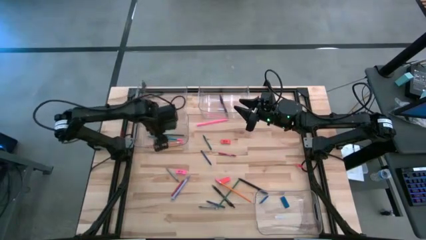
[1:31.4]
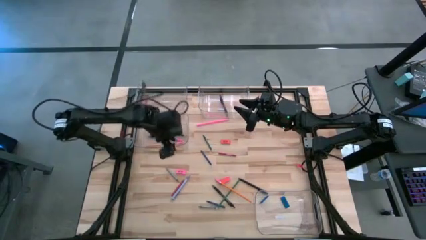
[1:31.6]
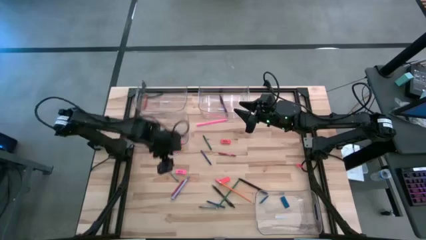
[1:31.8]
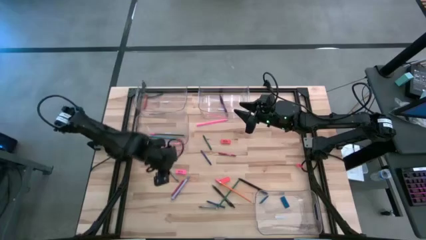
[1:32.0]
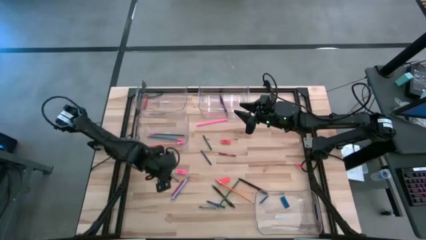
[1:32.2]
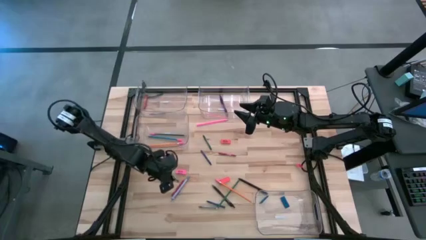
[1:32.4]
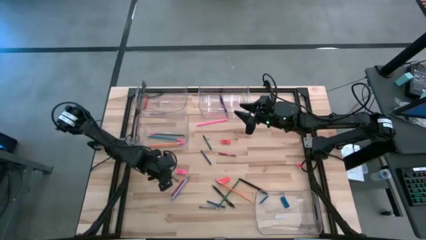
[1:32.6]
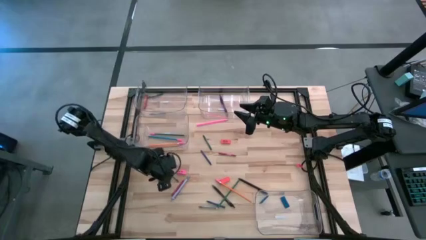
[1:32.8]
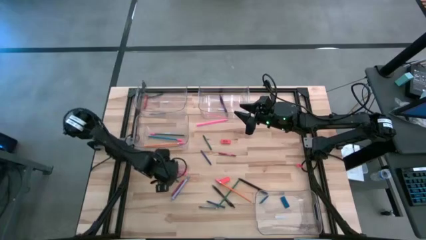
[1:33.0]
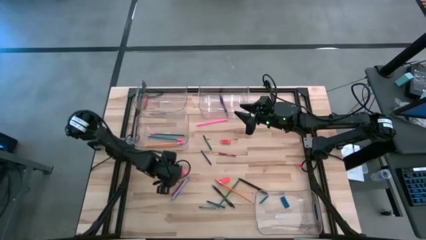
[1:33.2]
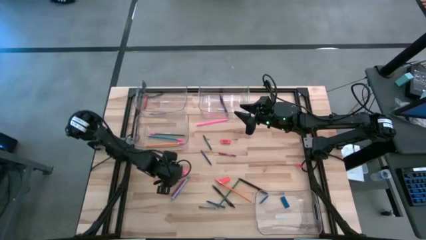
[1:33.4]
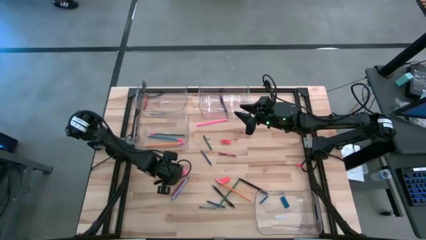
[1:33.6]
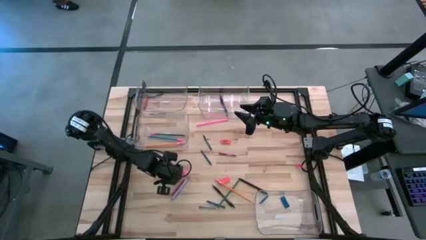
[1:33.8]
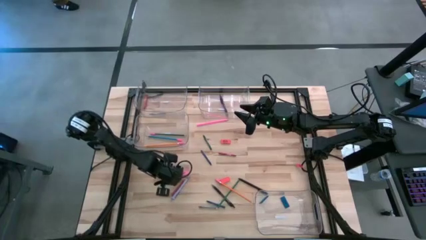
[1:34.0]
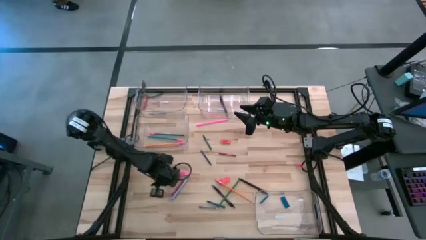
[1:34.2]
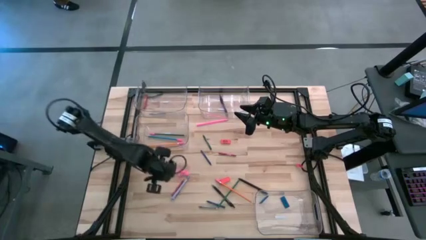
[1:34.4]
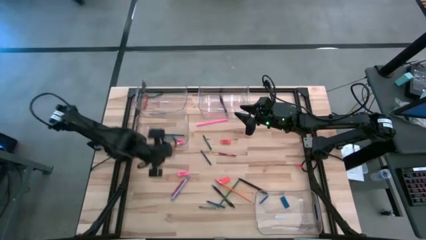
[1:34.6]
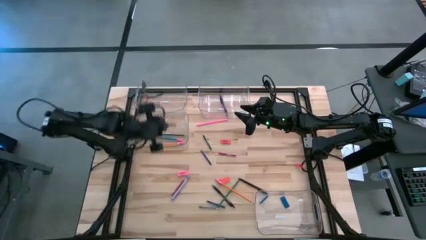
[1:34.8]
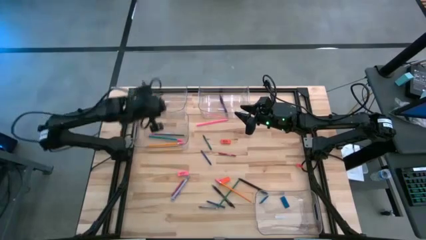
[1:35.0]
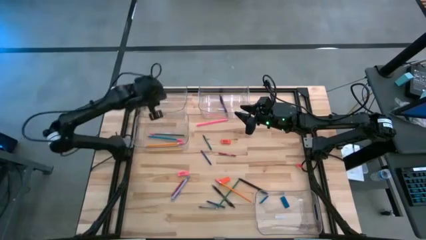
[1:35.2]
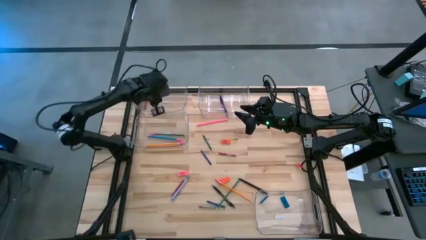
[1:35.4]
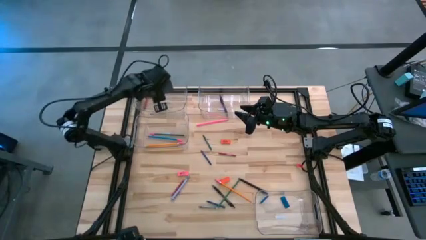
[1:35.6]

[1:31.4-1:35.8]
Task: Sort crayons/erasers/pens/pencils in bins
Put the gray crayon into the top left transparent bin

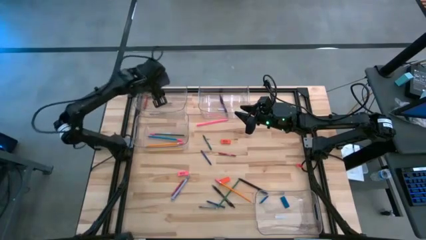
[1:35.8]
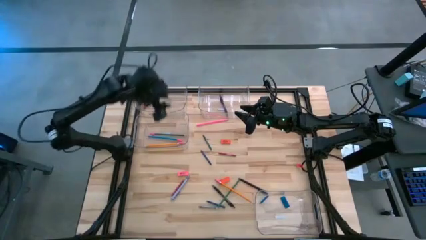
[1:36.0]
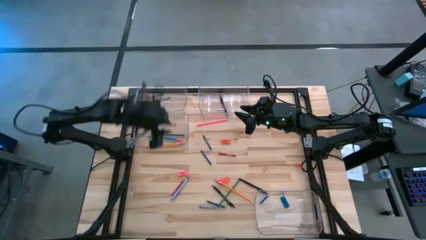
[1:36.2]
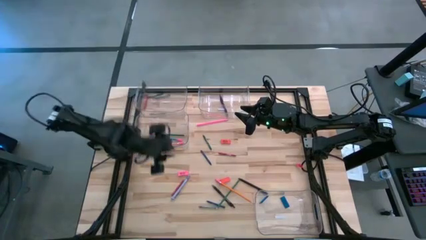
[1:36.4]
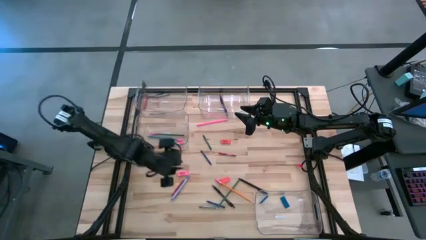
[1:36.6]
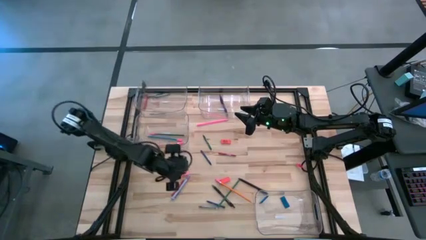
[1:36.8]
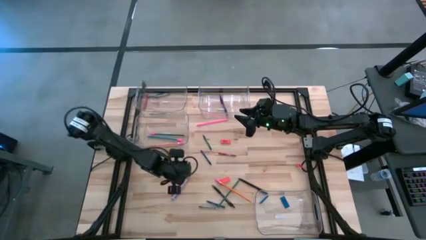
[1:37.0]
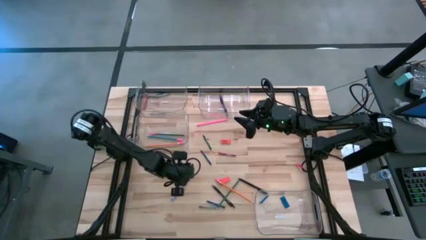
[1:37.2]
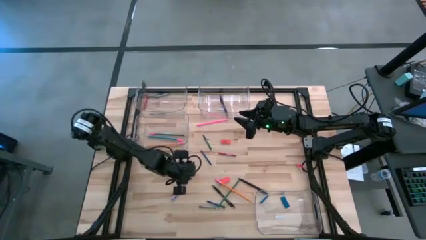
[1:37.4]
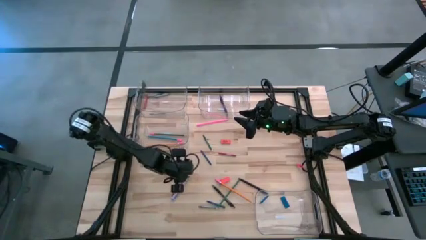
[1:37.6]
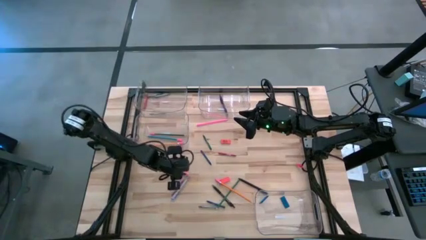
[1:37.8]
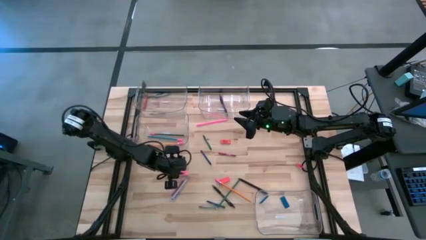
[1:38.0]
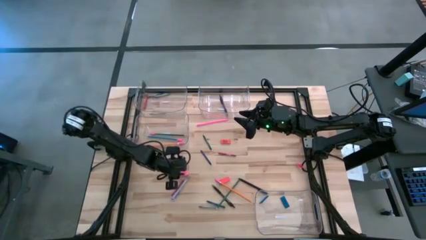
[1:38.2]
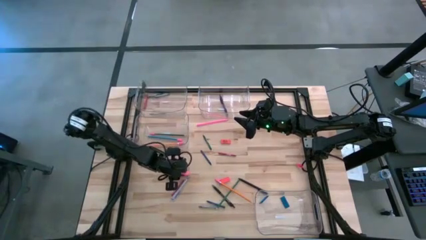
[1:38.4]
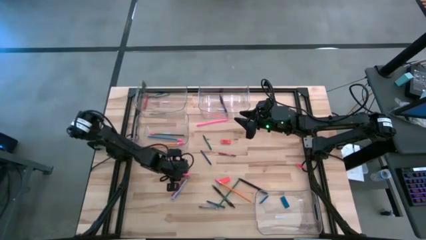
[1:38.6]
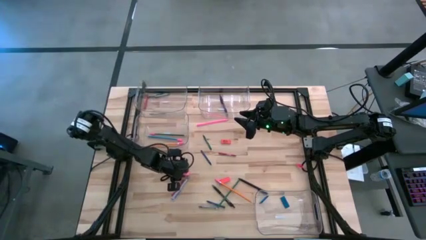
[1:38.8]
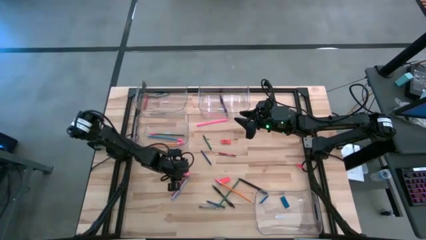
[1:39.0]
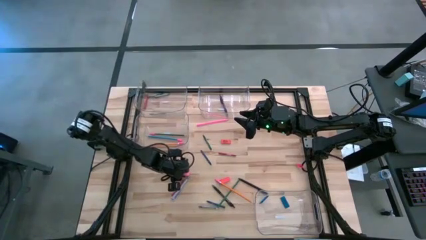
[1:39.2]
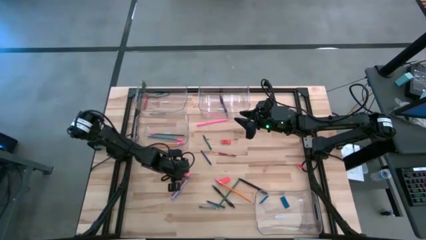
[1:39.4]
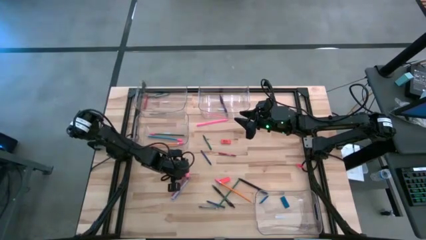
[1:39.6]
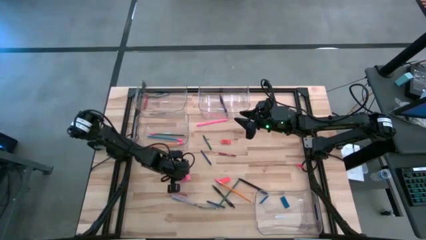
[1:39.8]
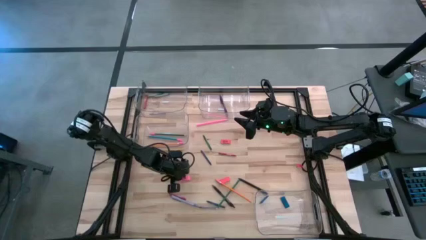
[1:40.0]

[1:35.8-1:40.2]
Put the pink eraser into the bottom right transparent bin

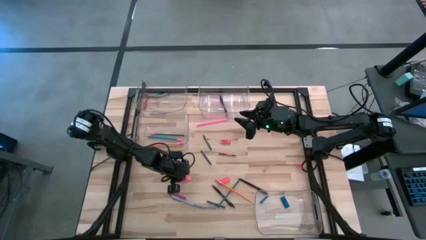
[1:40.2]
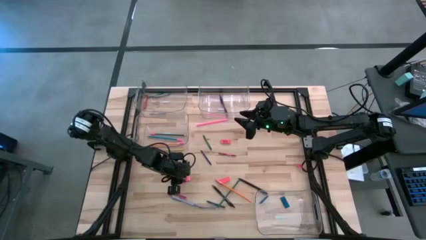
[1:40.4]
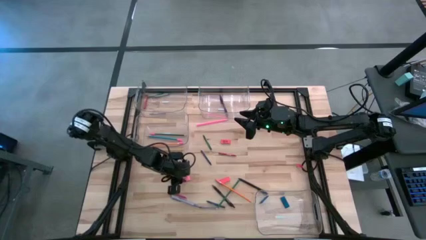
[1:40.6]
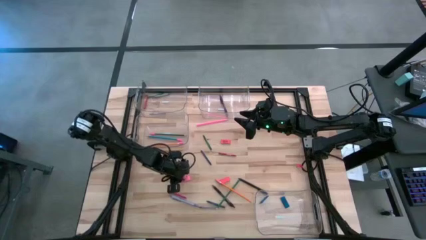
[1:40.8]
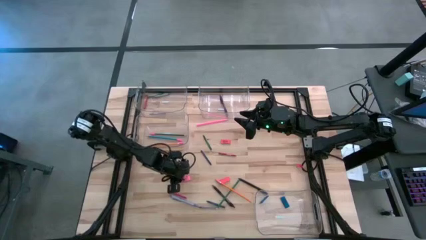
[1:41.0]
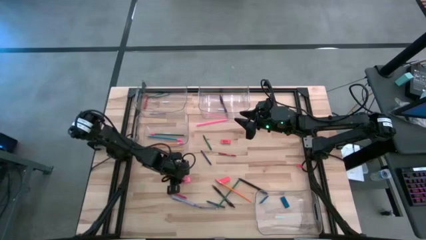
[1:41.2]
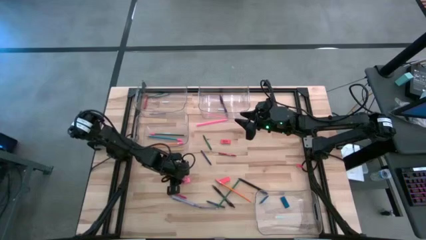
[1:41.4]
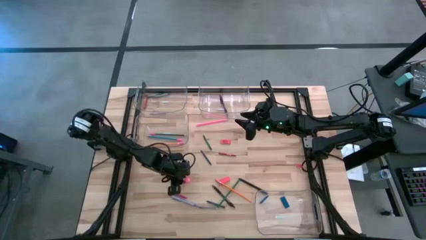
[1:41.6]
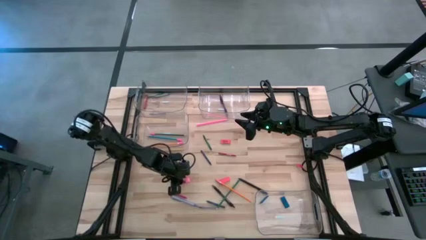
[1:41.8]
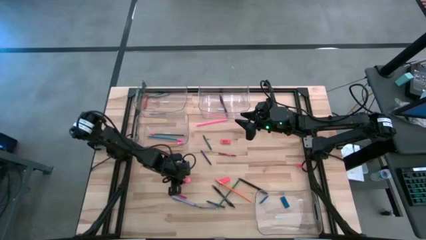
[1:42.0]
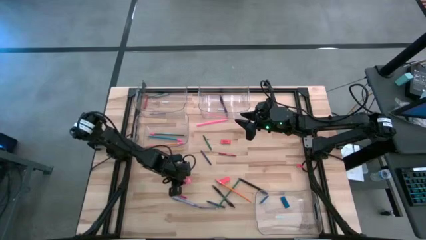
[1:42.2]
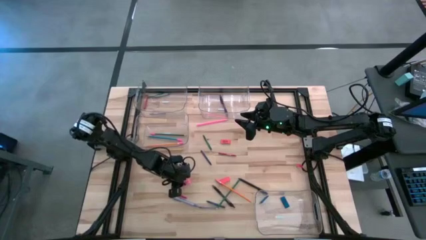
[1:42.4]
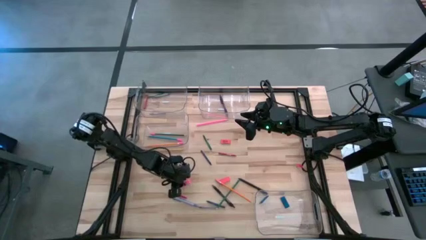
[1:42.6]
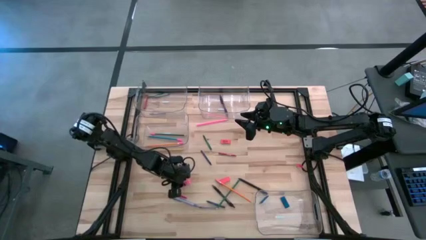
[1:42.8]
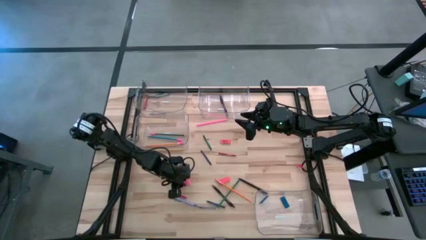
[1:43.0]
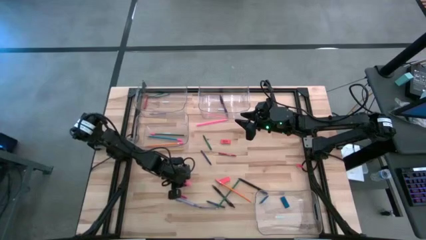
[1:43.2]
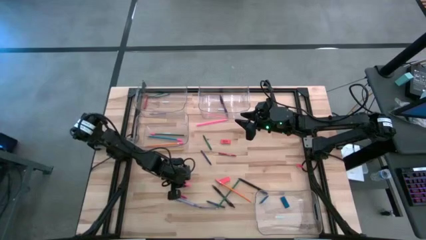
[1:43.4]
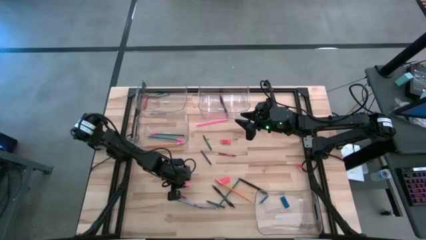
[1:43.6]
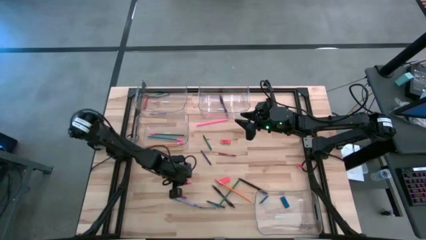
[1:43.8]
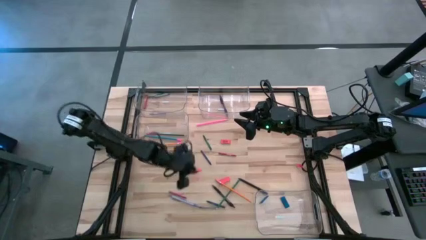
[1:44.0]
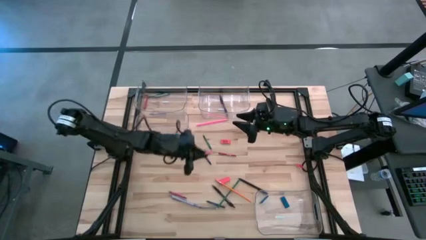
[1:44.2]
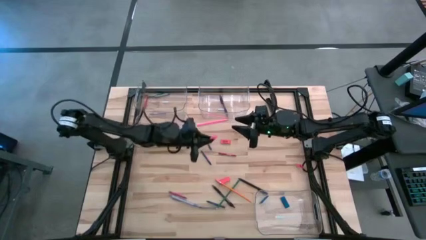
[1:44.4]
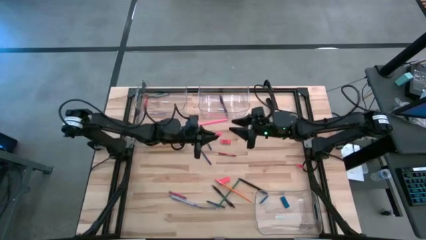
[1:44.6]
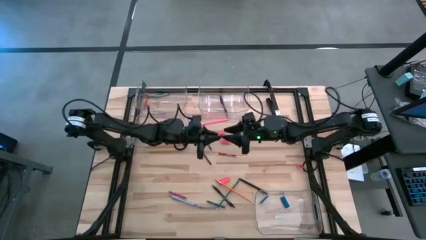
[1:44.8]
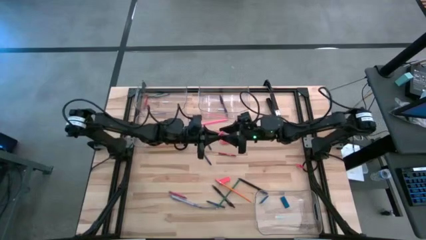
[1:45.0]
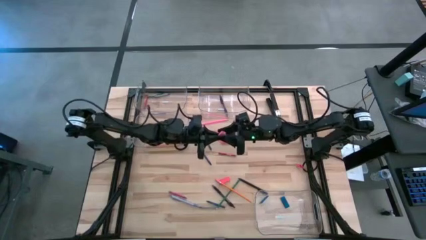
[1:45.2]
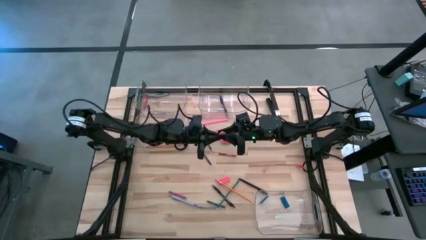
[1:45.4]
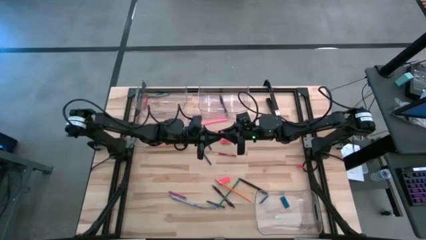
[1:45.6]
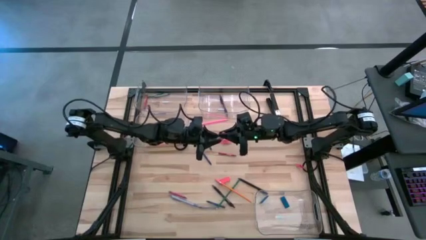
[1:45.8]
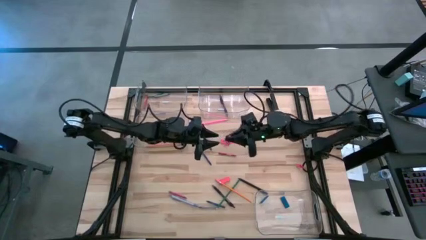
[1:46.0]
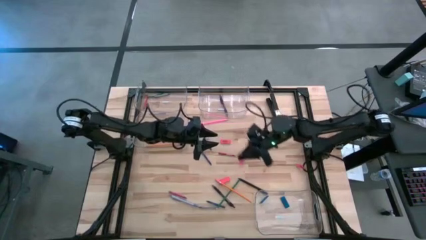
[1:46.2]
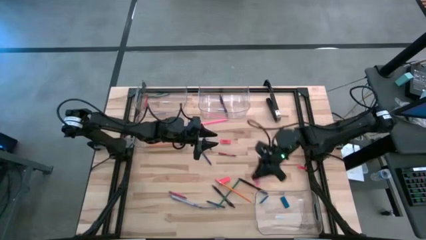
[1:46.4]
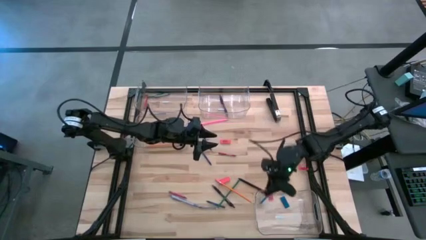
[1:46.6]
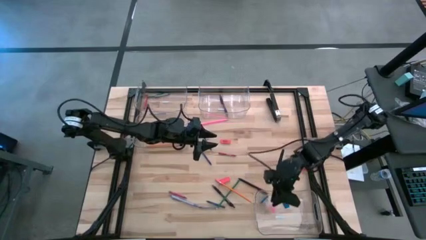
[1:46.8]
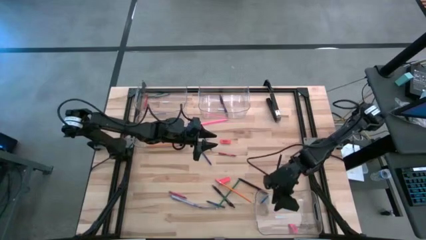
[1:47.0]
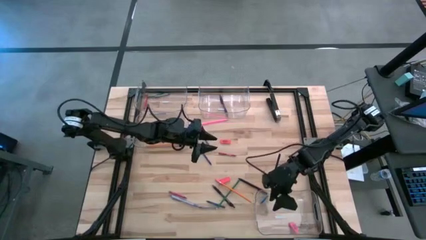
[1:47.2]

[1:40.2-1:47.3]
Put the pink eraser into the bottom right transparent bin
